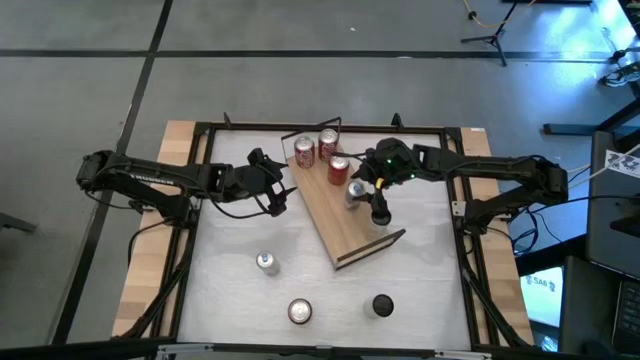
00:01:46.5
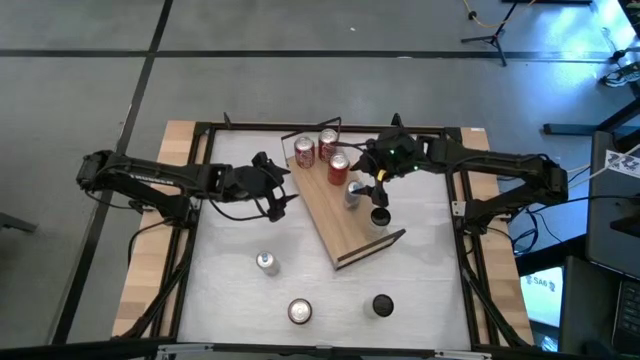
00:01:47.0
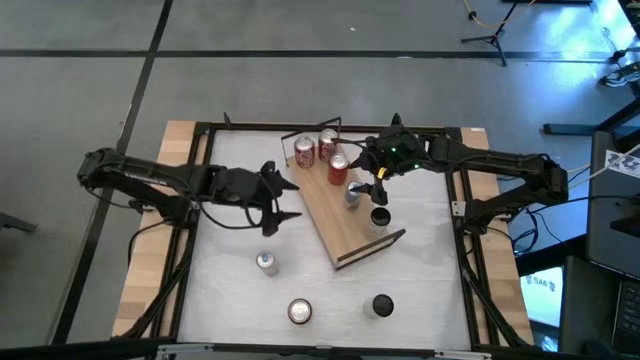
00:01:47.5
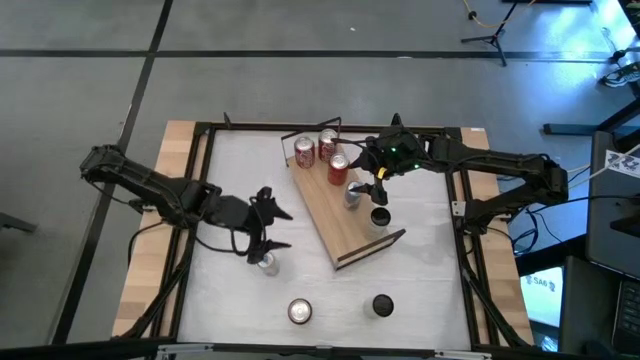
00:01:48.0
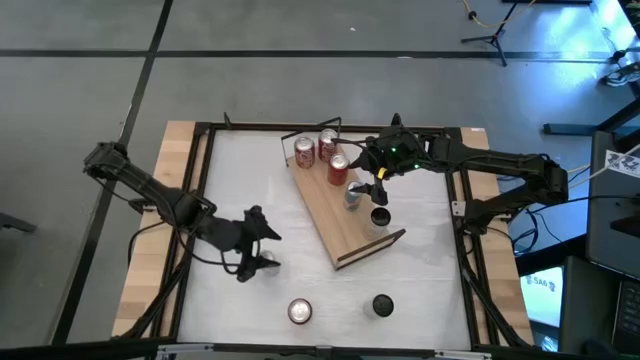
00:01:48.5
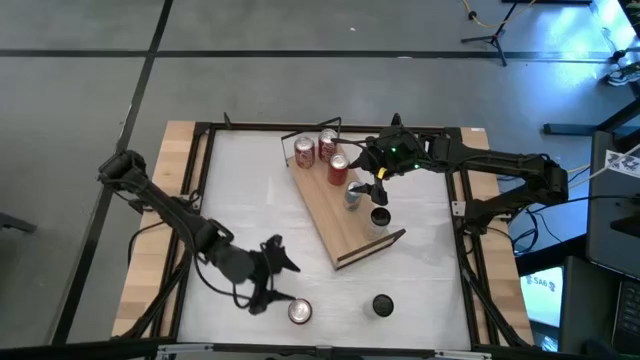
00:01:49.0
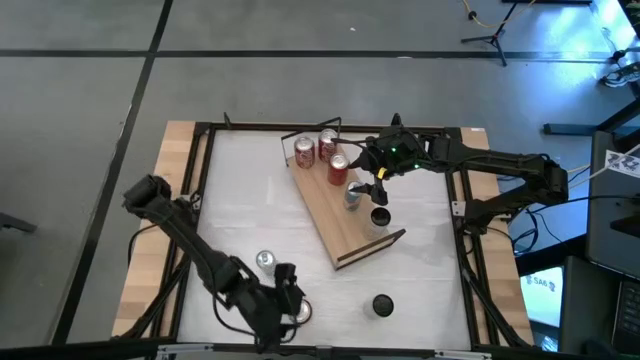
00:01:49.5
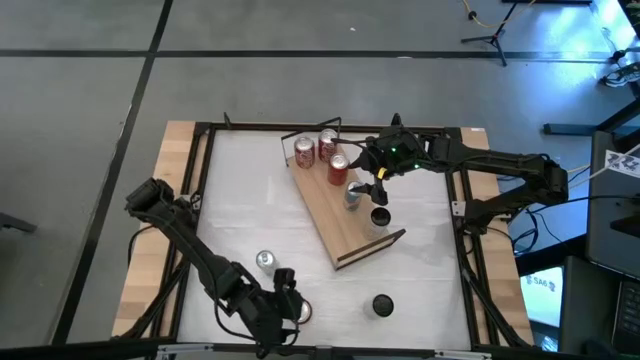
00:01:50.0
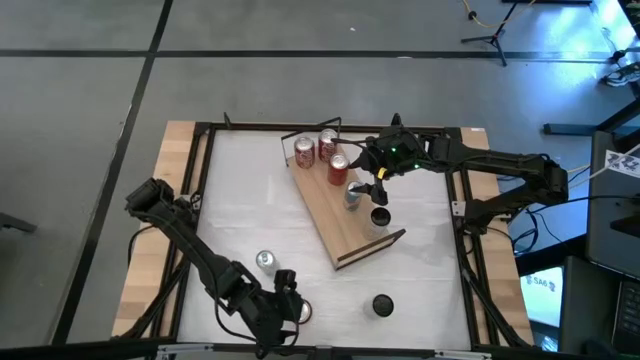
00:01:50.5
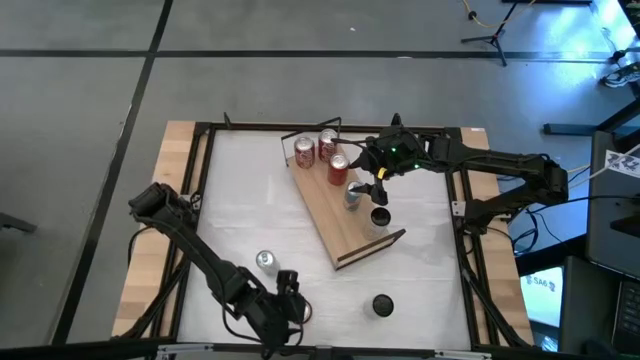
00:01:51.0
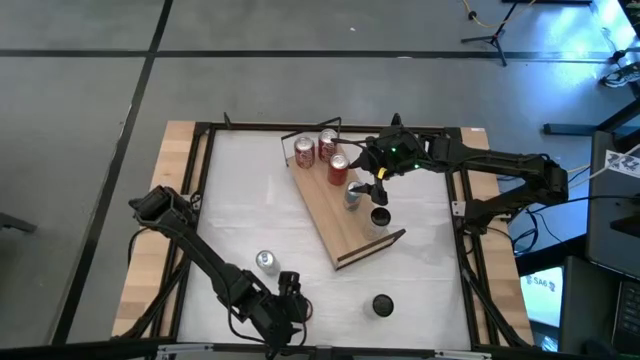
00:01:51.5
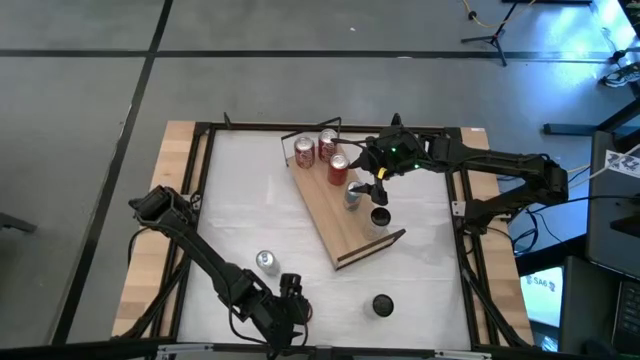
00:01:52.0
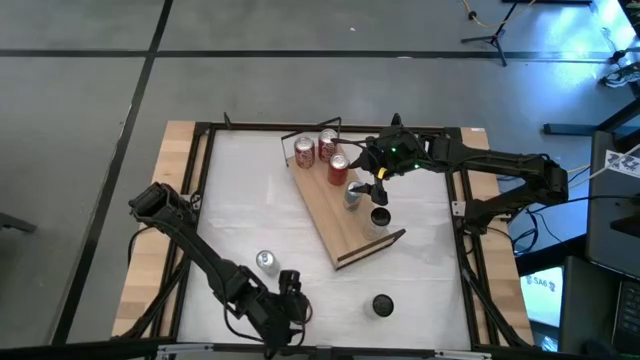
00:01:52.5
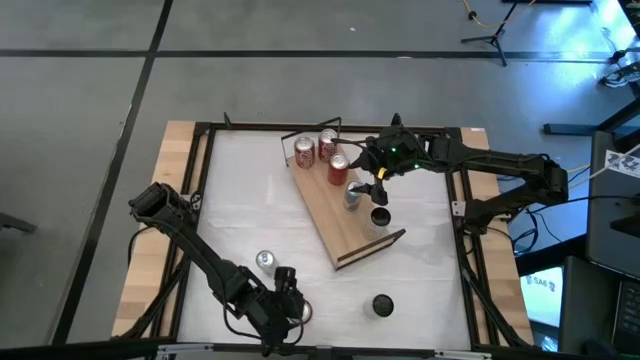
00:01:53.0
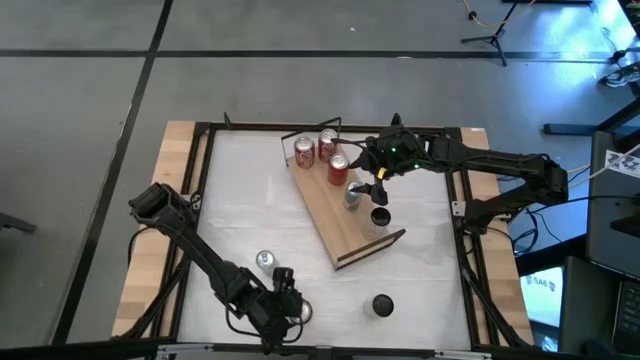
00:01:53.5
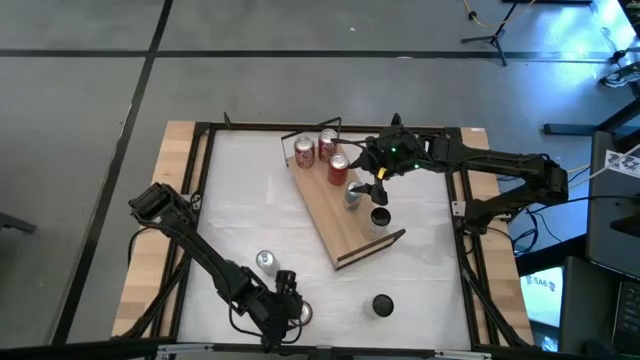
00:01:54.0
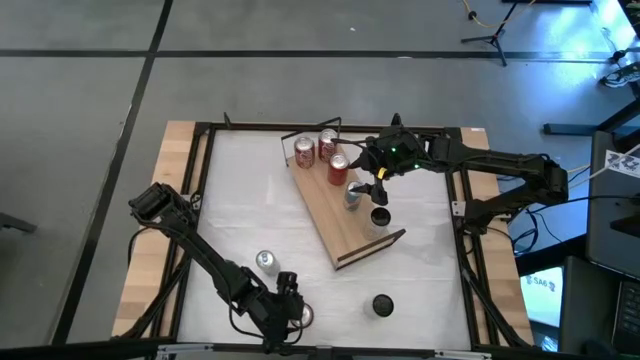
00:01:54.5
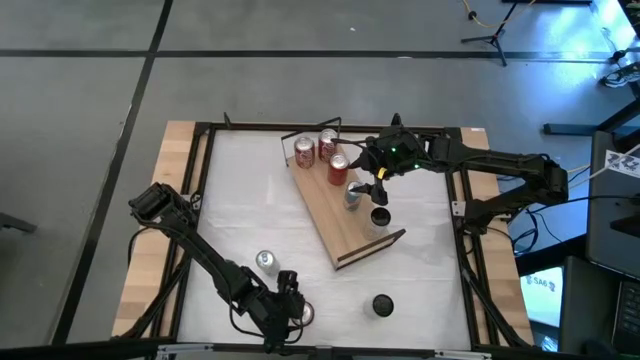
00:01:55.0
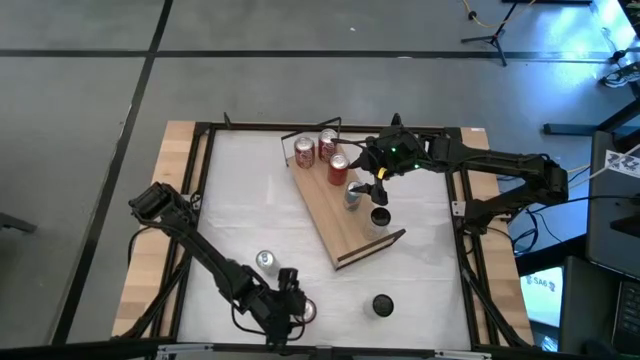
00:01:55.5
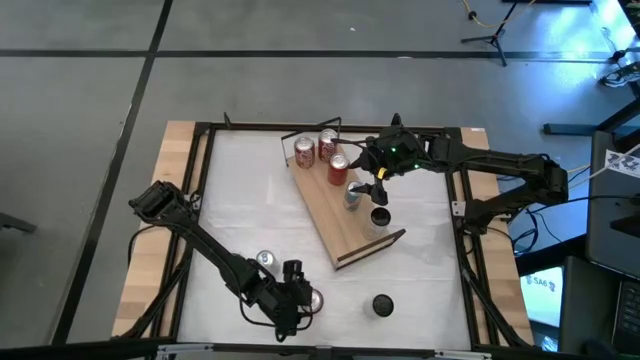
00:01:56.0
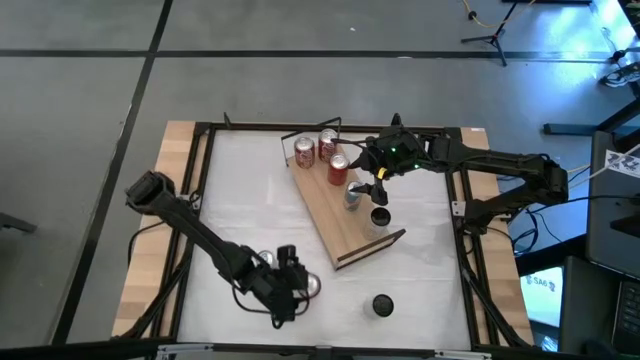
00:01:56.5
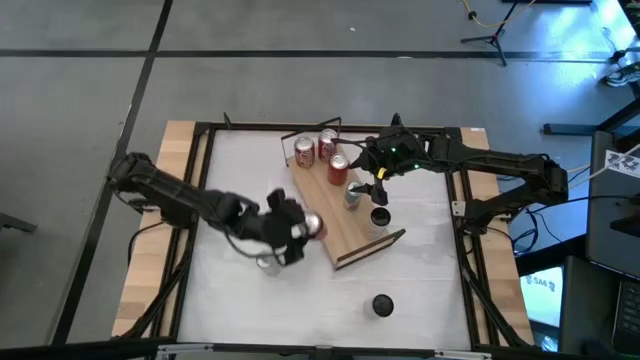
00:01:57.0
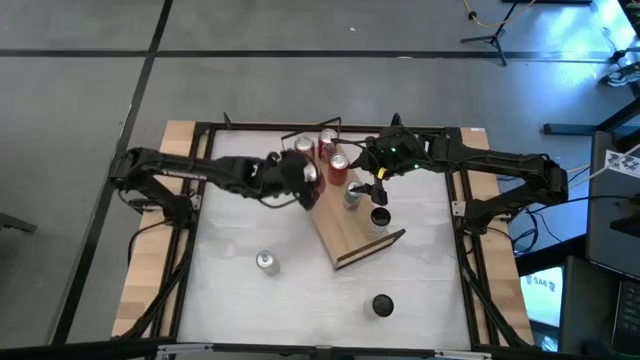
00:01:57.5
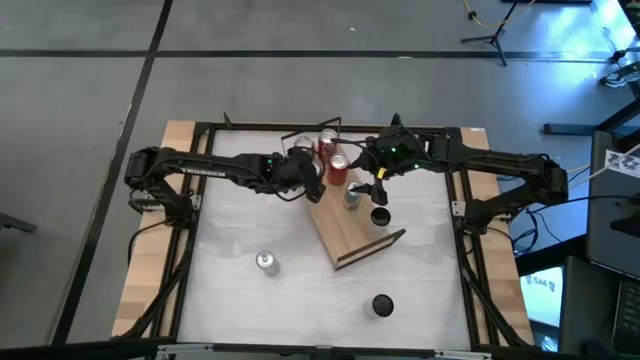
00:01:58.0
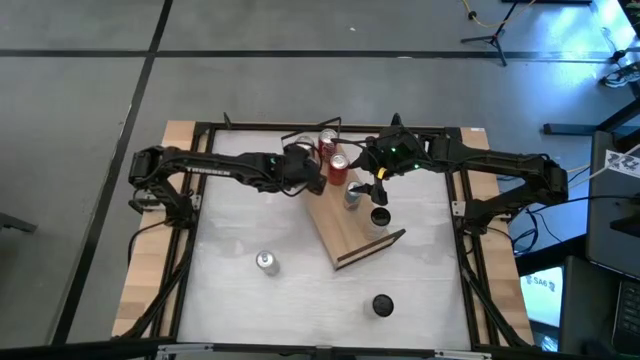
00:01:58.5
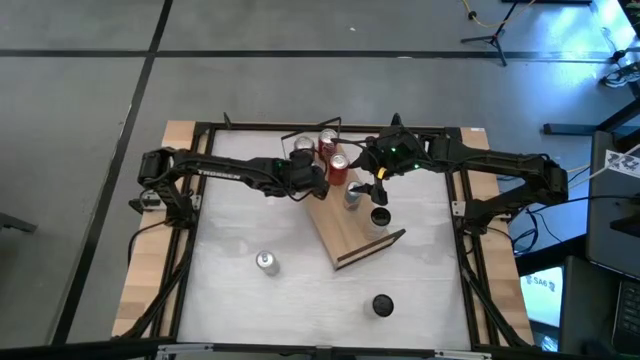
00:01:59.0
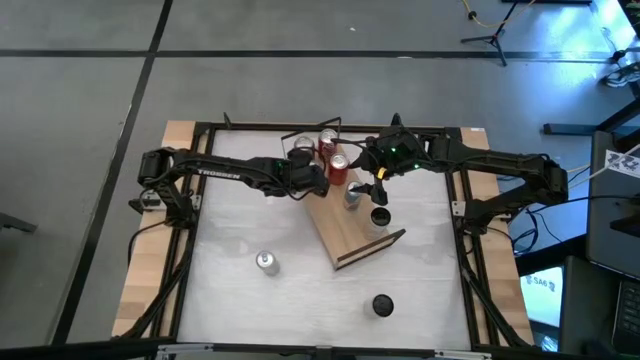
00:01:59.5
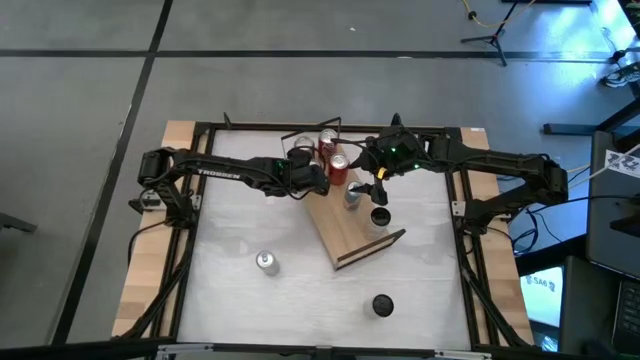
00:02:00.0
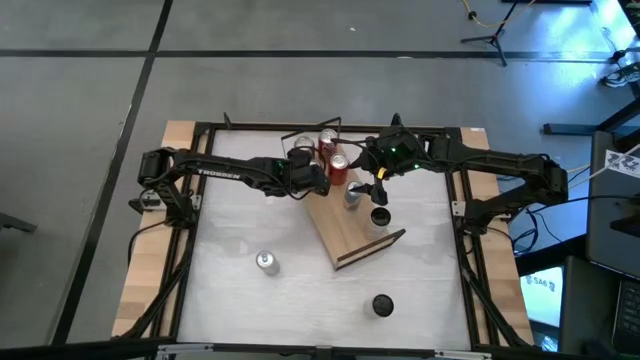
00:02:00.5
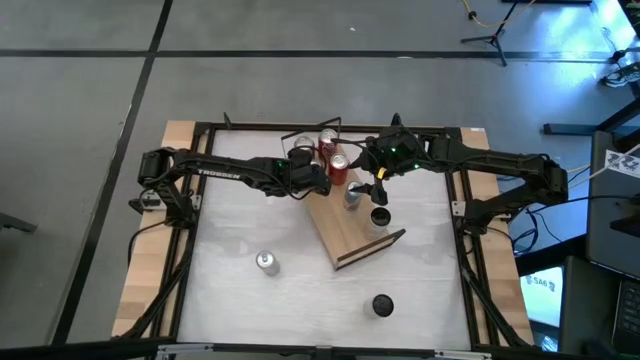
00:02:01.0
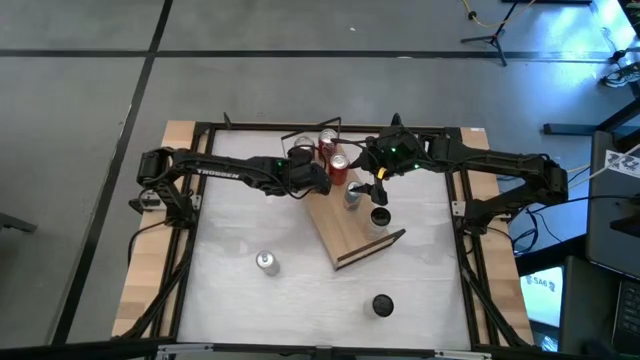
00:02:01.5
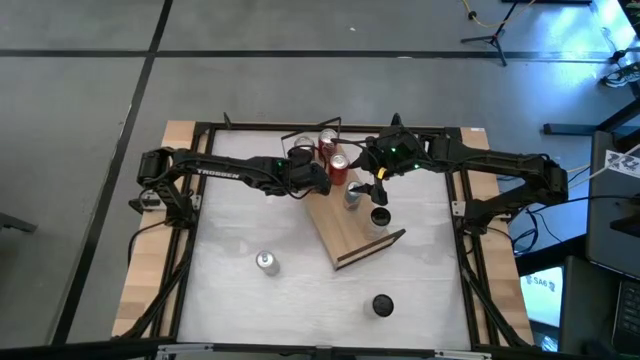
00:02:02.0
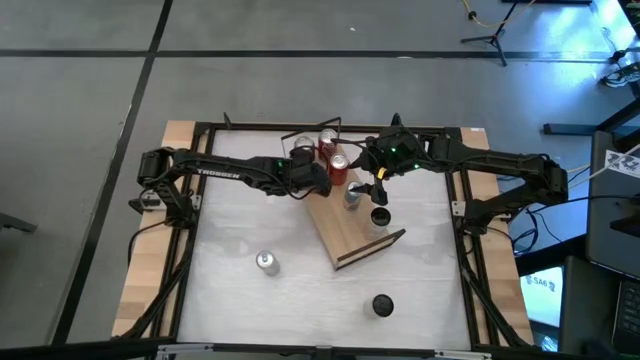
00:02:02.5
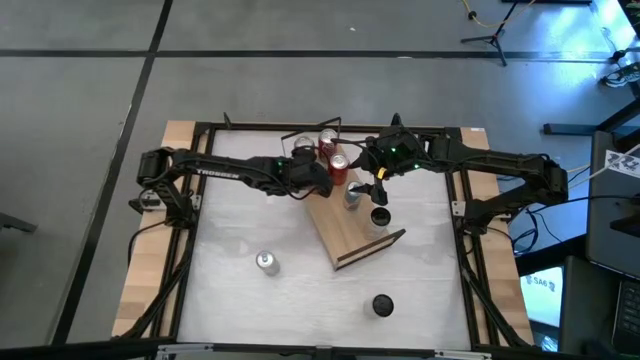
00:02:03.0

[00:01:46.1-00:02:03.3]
Task: Place canned beverage on shelf
Put the red black soda can on the shelf aligned with the other red black soda can

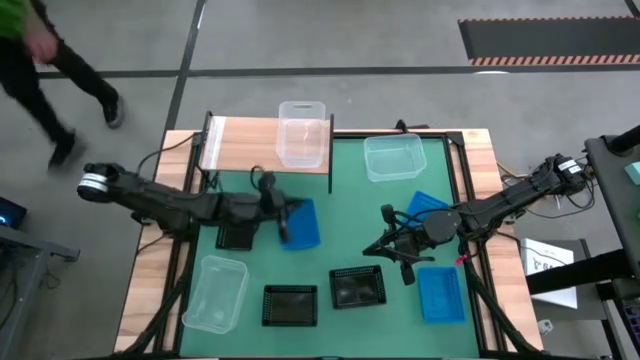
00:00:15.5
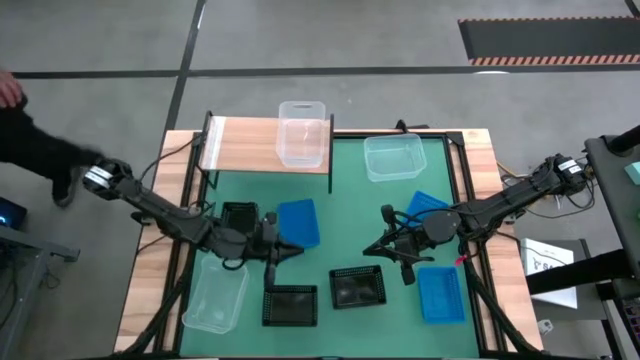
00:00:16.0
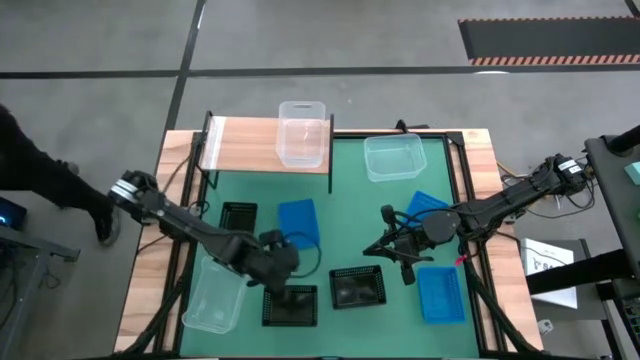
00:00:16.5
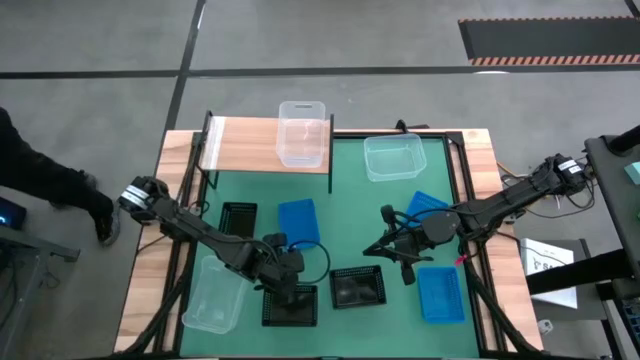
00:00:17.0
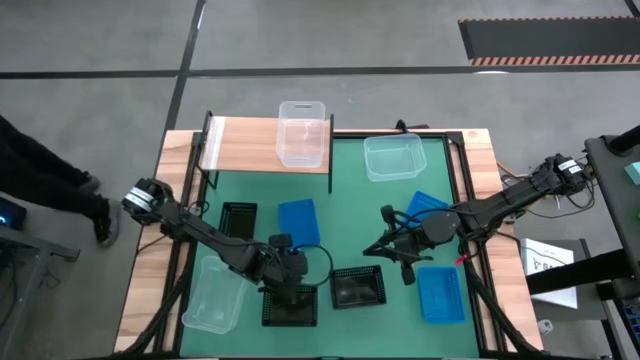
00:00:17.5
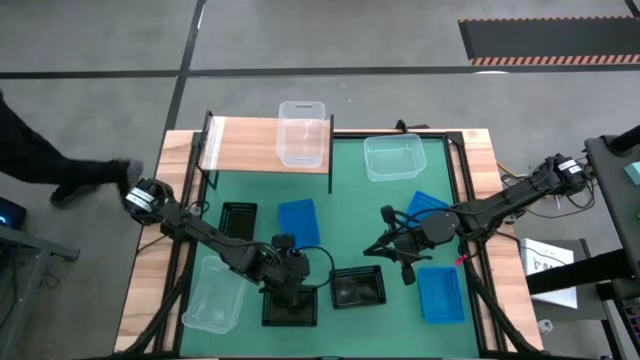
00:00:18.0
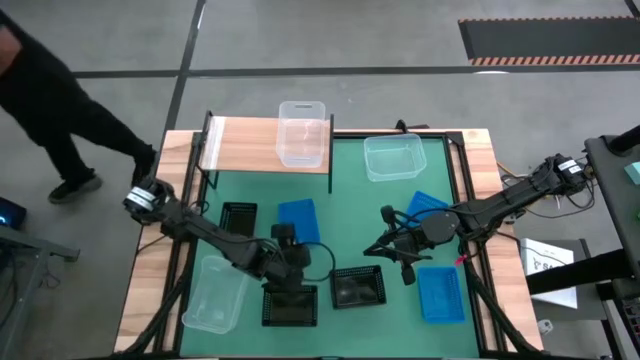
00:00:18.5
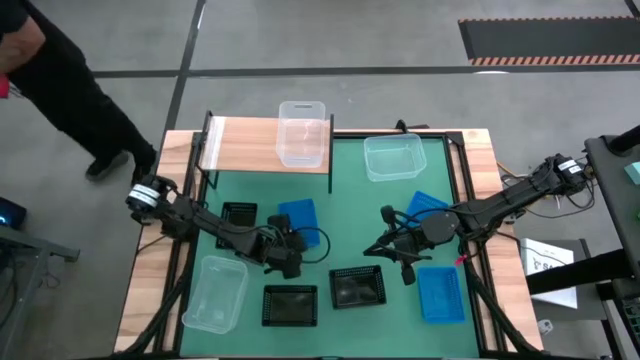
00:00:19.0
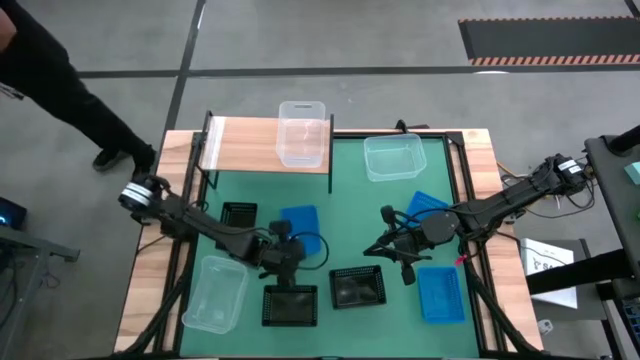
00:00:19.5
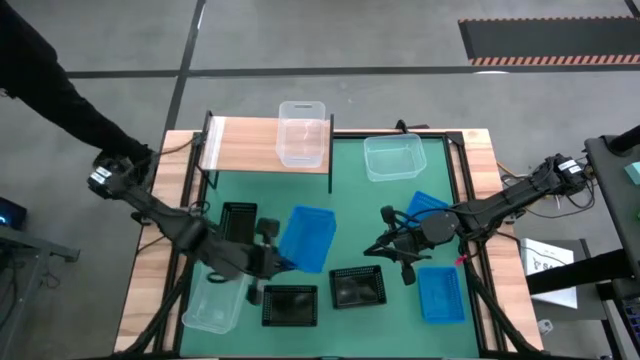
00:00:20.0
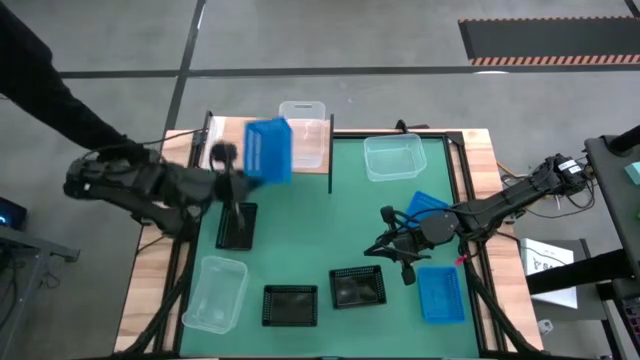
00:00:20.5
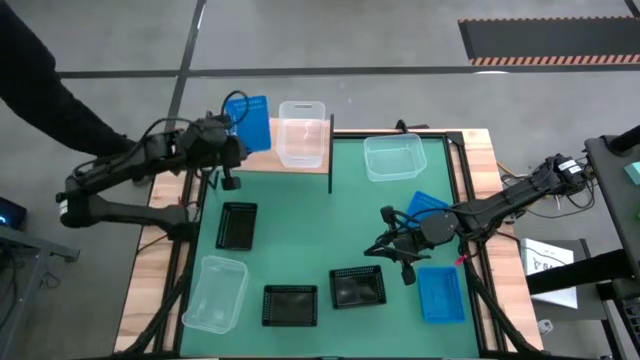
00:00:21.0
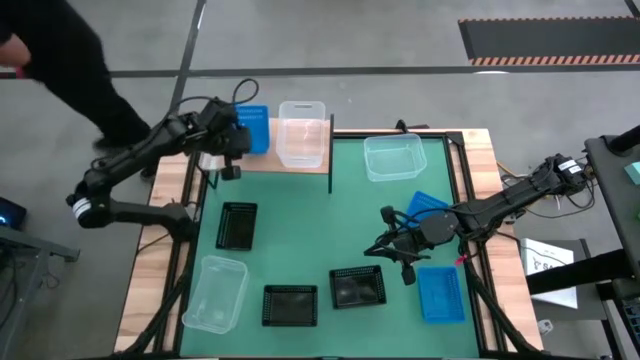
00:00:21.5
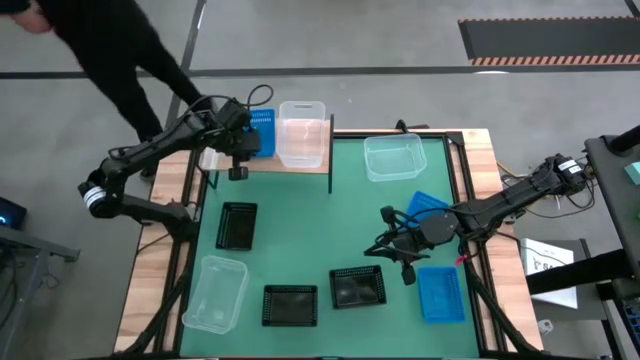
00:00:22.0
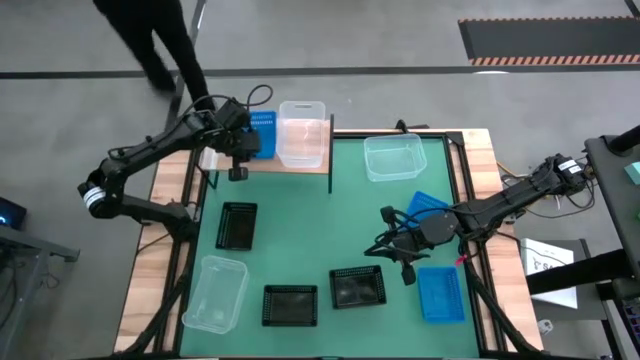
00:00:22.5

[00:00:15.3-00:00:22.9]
Task: Stack baskets on shelf by color
Put the top left blue bin on the shelf
